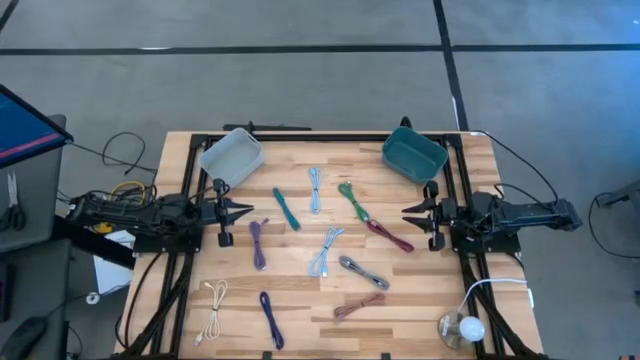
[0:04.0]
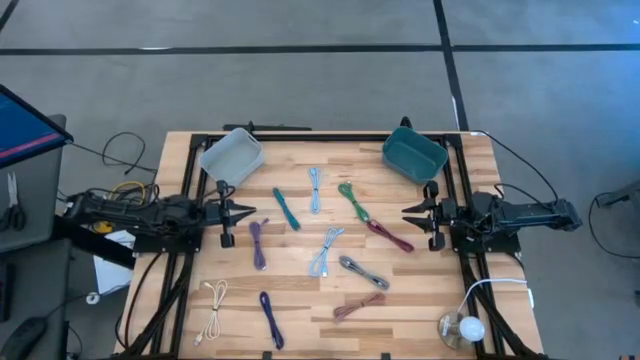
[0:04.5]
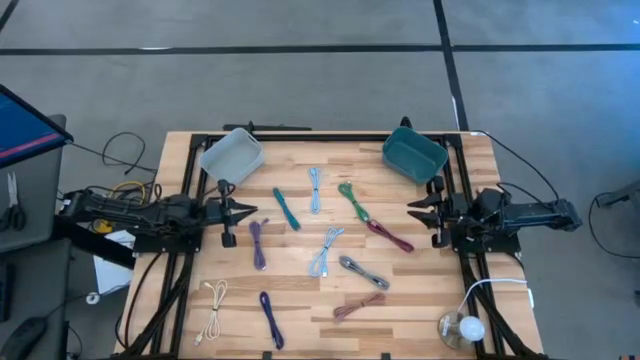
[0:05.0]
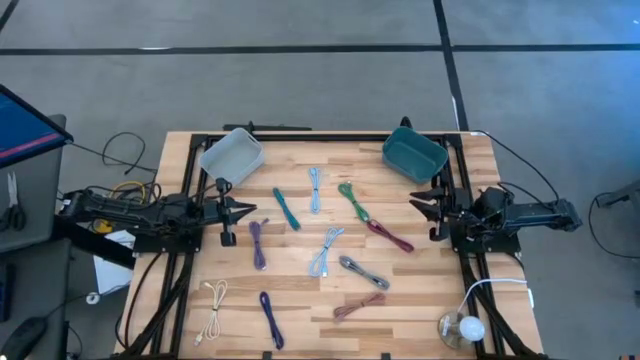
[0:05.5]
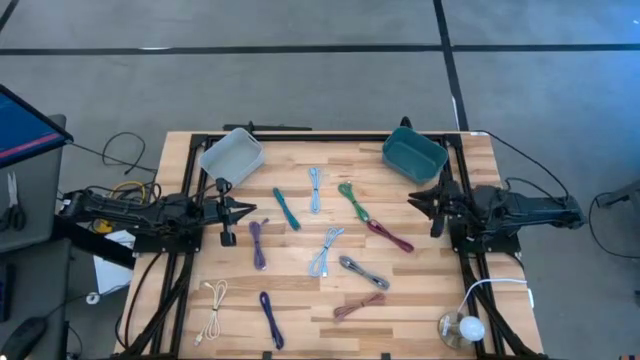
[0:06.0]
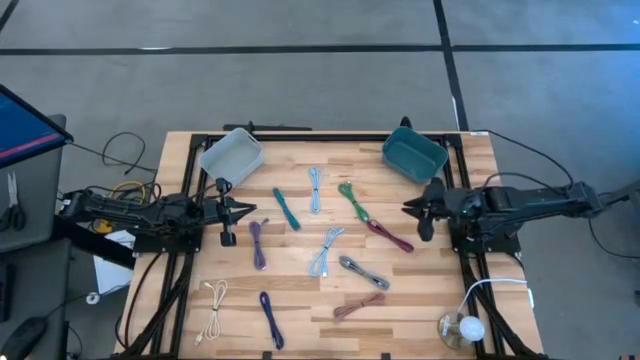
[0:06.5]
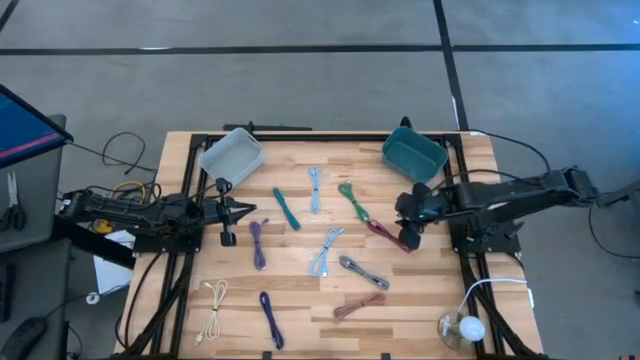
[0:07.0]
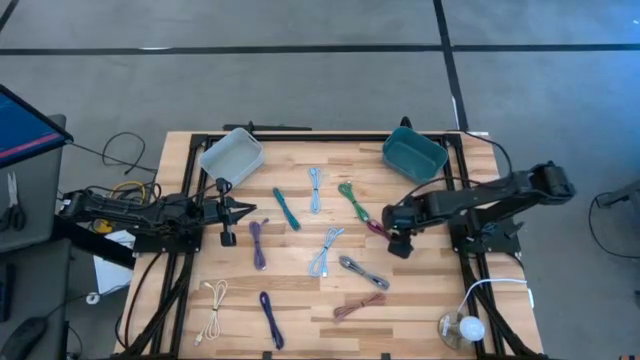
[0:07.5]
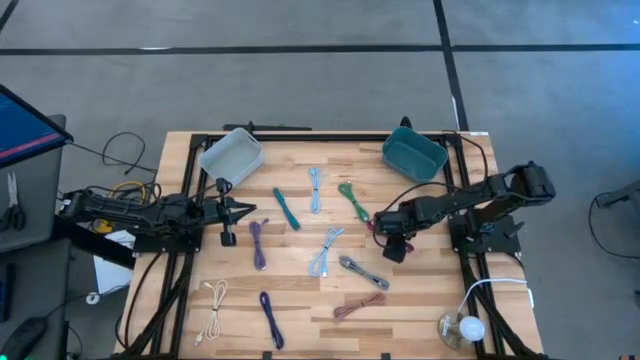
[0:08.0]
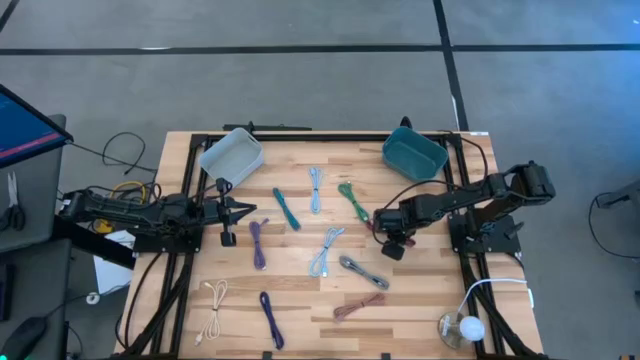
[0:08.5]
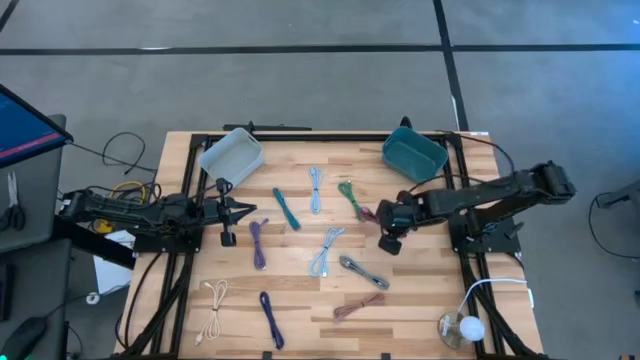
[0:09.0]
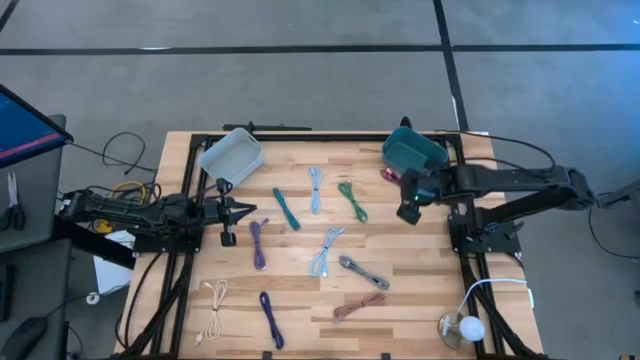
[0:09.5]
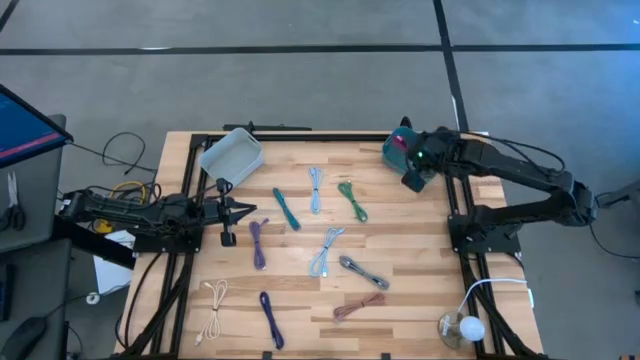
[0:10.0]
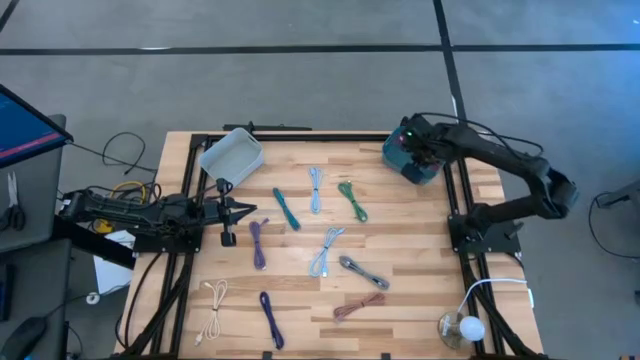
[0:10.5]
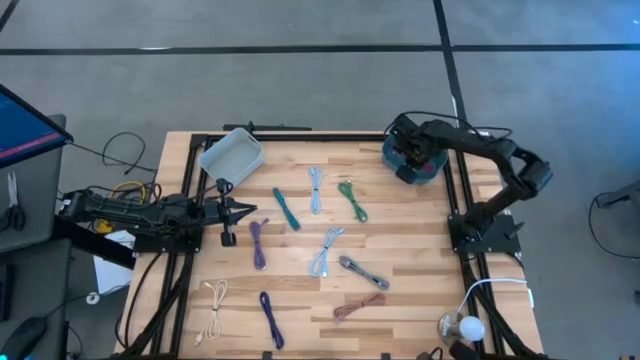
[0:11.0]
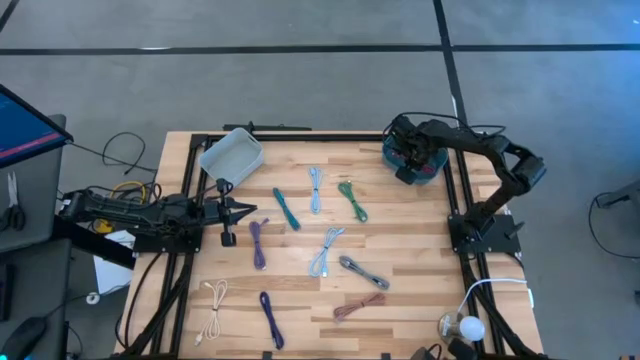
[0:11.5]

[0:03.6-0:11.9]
Task: Pick & Place USB Port
Put the black pink charger cable into the green bin

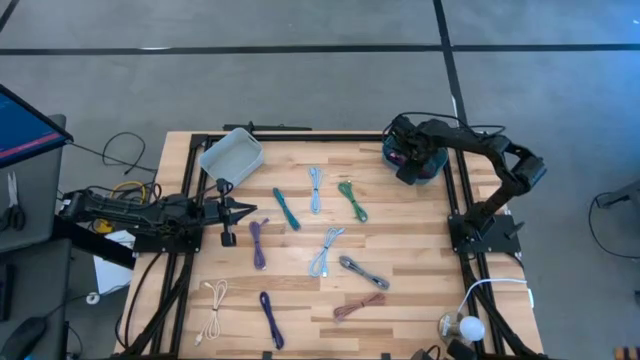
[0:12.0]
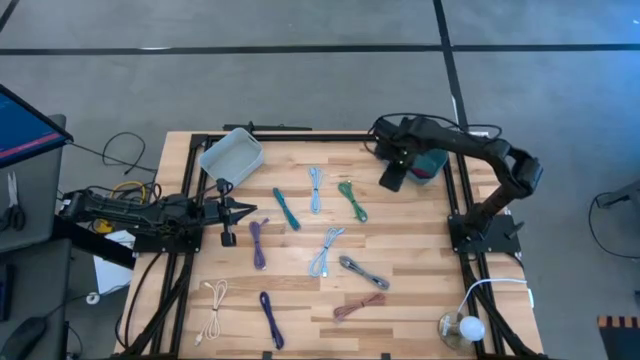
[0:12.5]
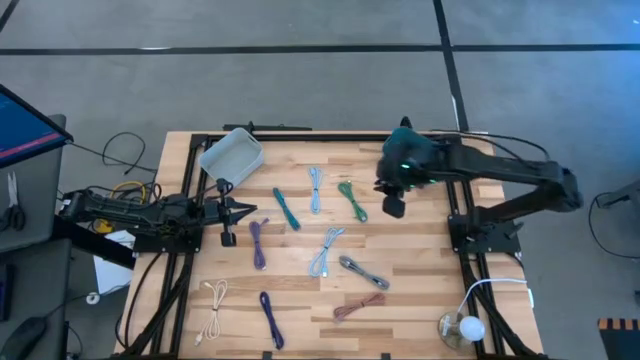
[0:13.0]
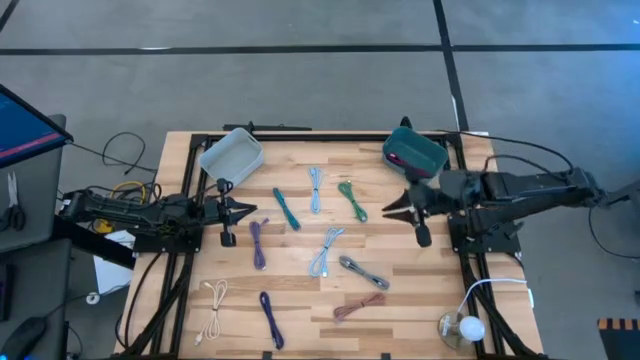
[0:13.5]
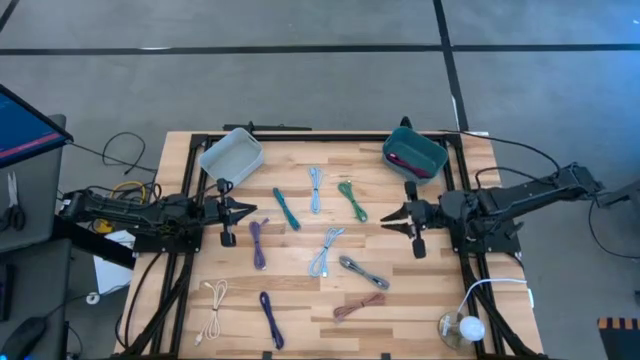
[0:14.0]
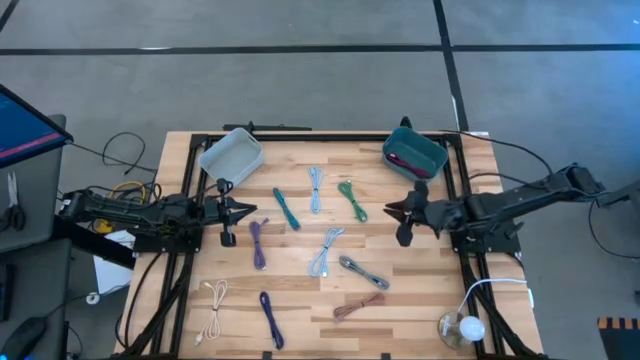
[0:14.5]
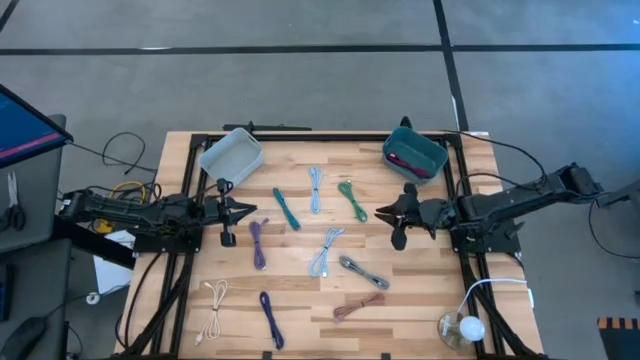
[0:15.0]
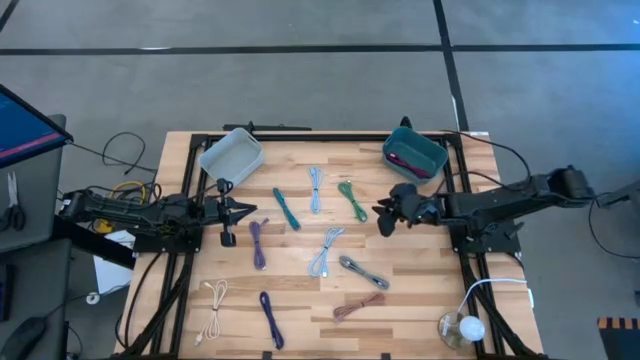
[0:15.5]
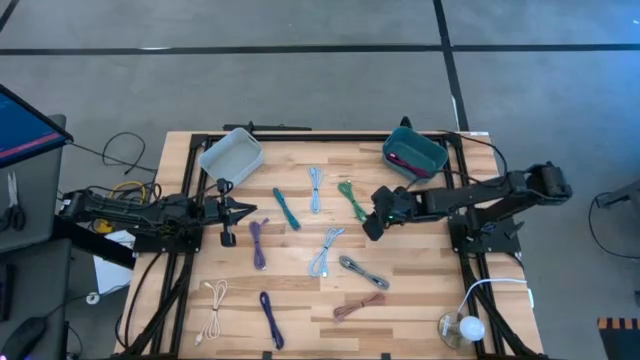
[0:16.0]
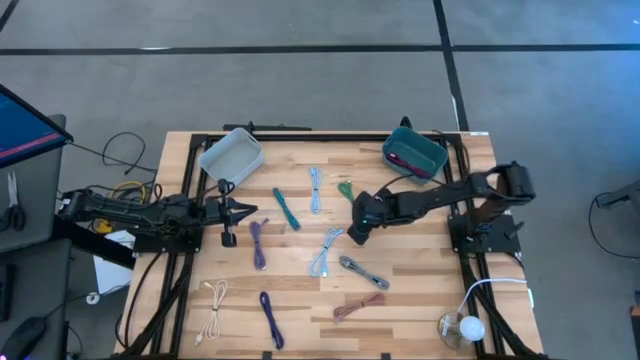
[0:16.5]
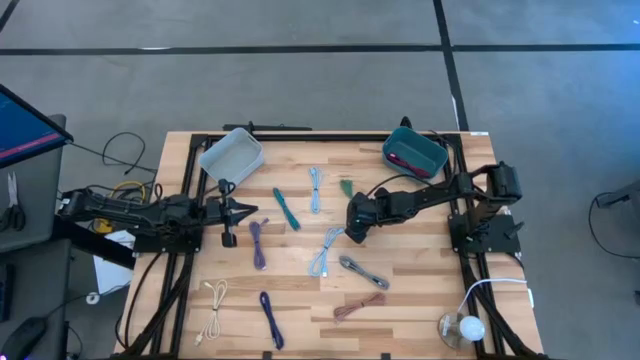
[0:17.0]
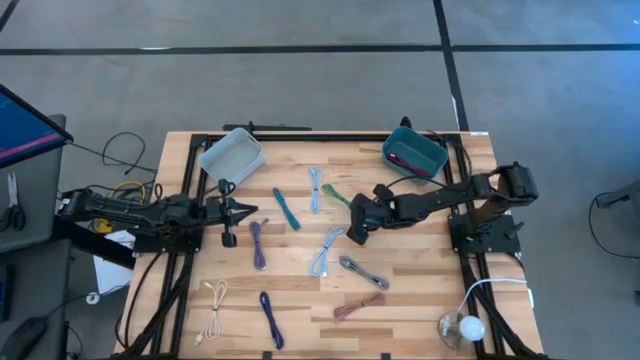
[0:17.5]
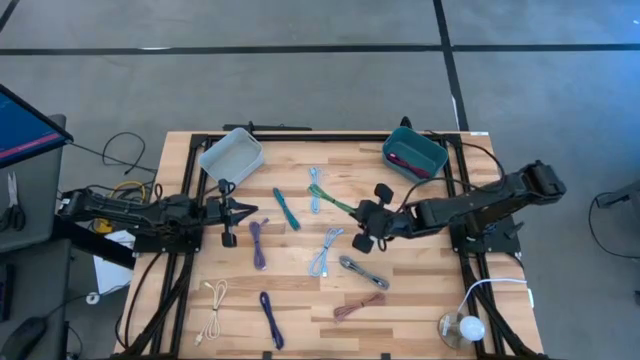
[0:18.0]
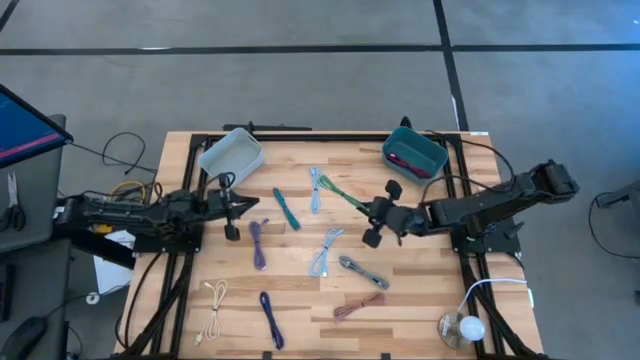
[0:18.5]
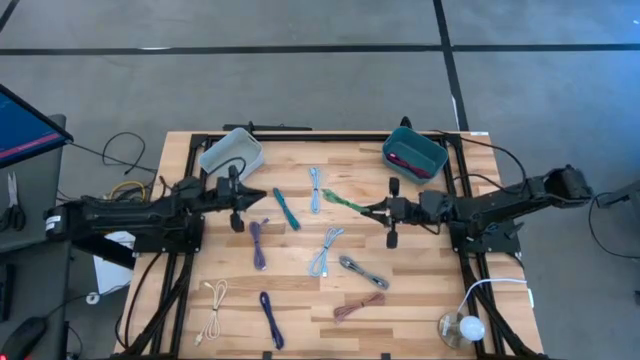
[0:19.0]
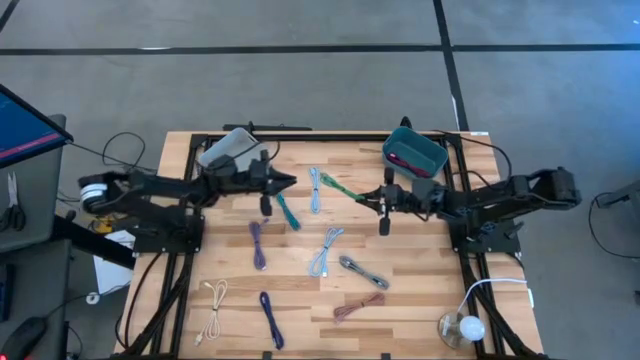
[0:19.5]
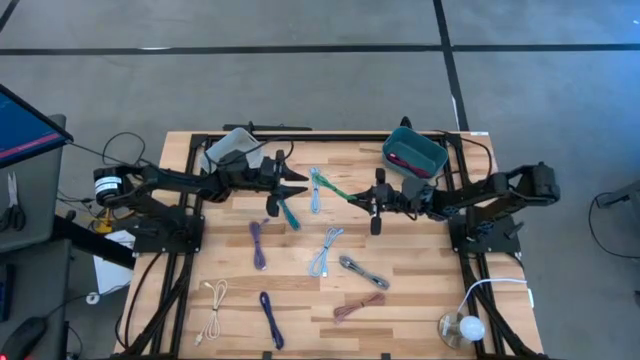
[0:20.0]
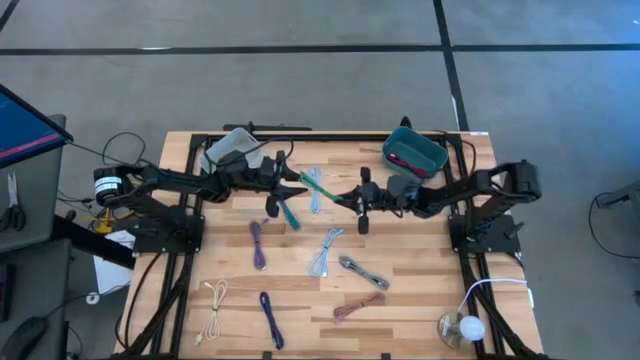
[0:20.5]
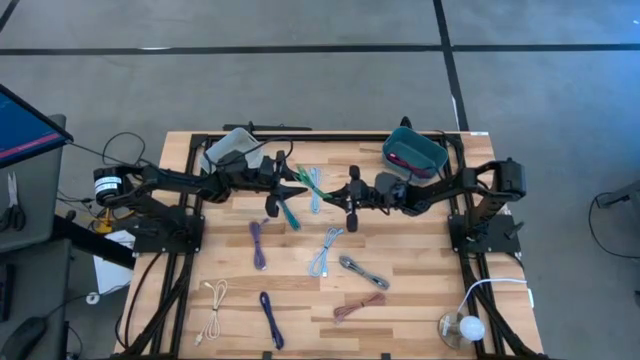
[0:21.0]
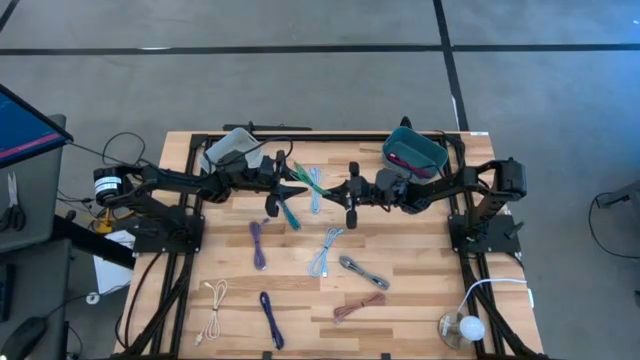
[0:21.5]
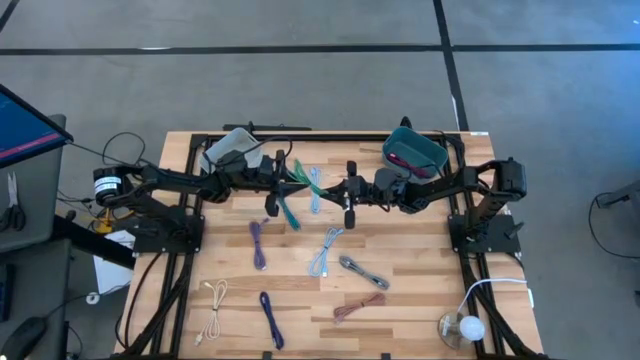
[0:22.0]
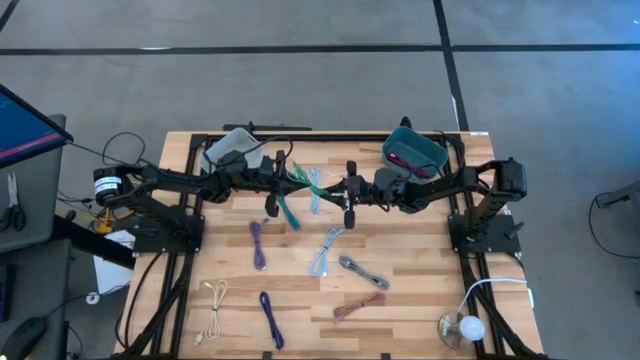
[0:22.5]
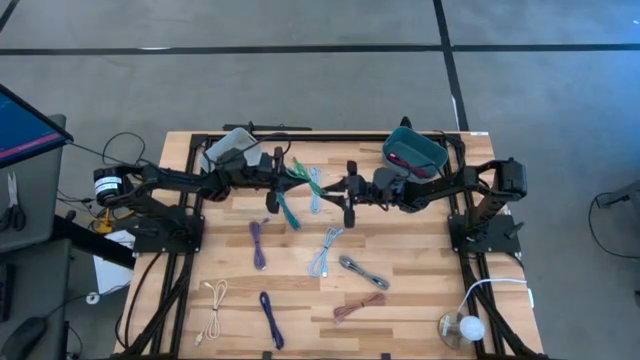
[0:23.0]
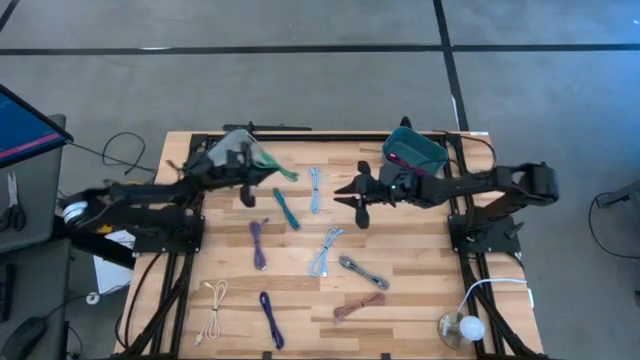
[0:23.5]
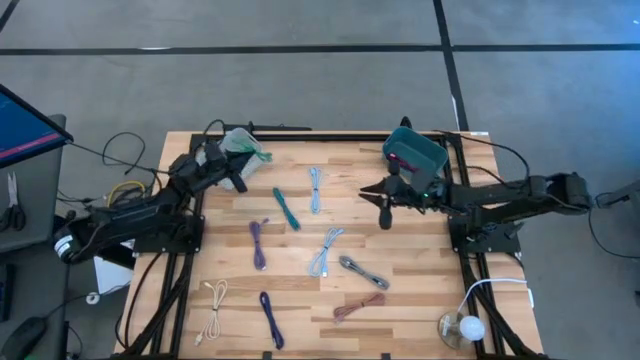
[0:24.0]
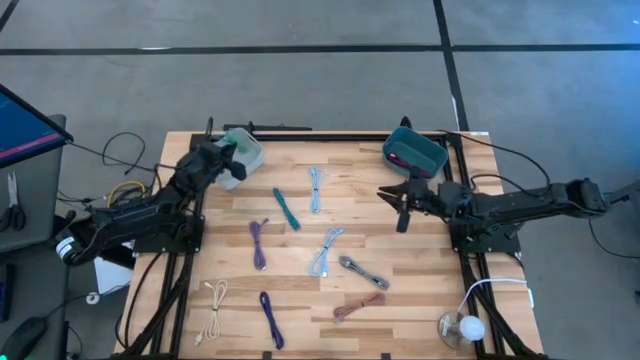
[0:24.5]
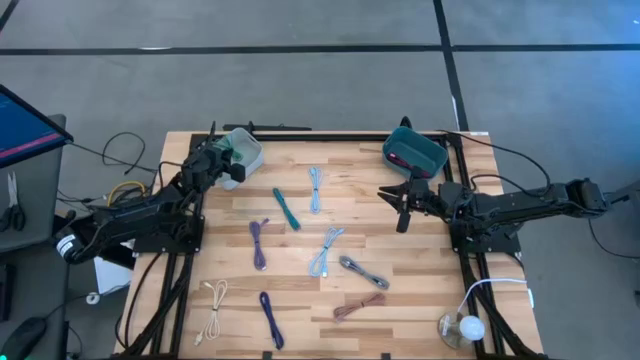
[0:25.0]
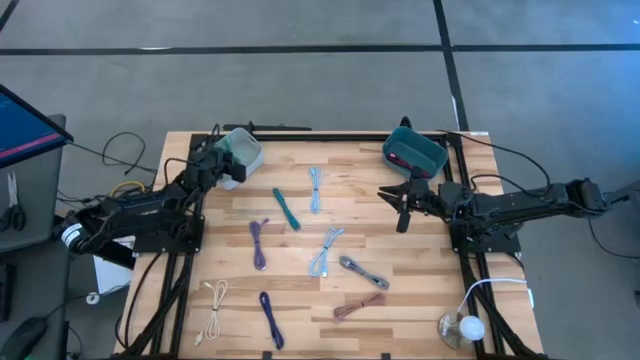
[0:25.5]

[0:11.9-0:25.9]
Put the green charger cable into the white bin
